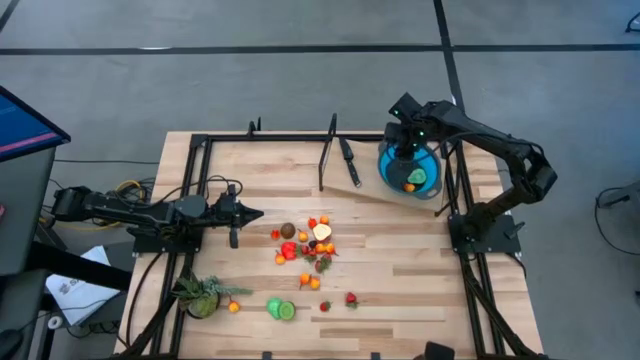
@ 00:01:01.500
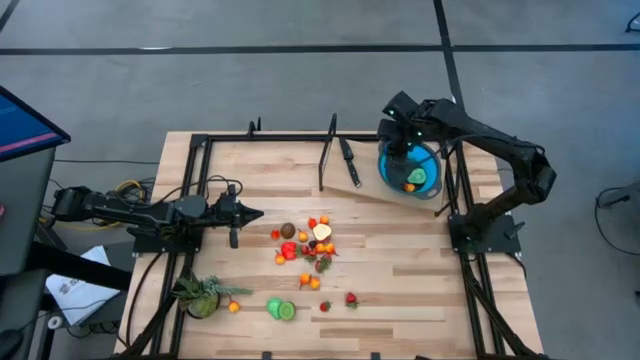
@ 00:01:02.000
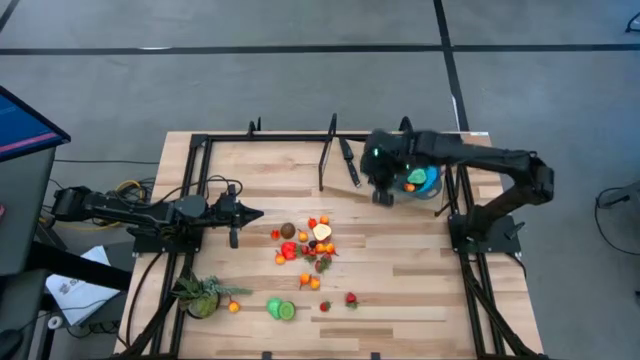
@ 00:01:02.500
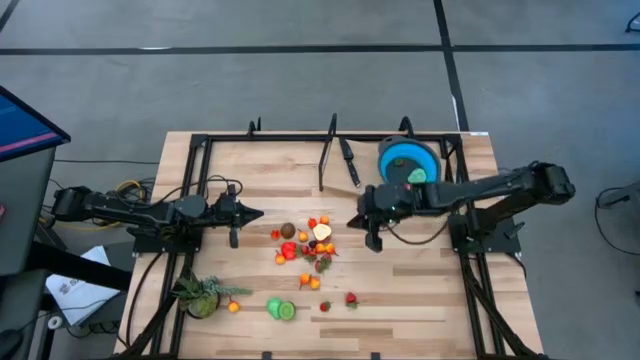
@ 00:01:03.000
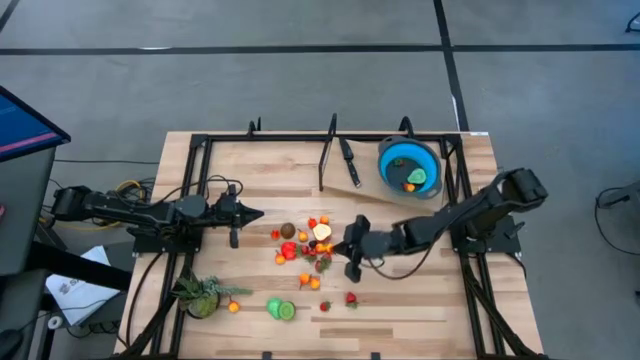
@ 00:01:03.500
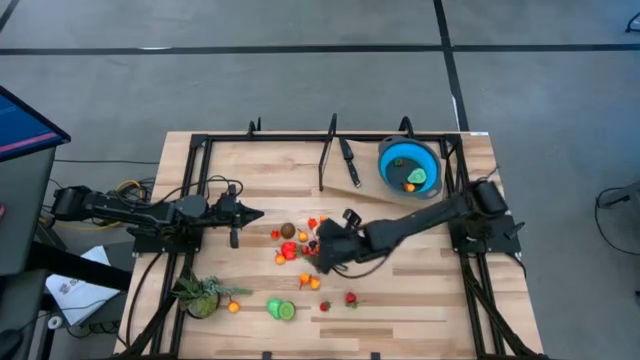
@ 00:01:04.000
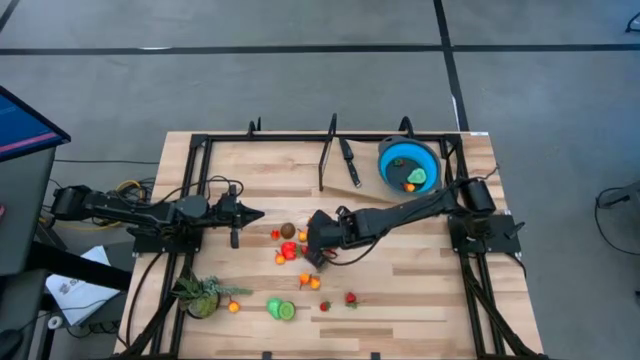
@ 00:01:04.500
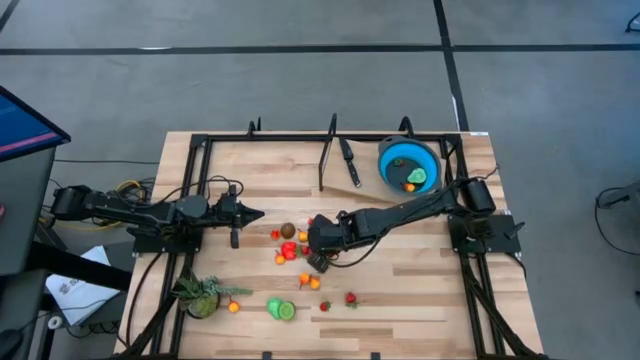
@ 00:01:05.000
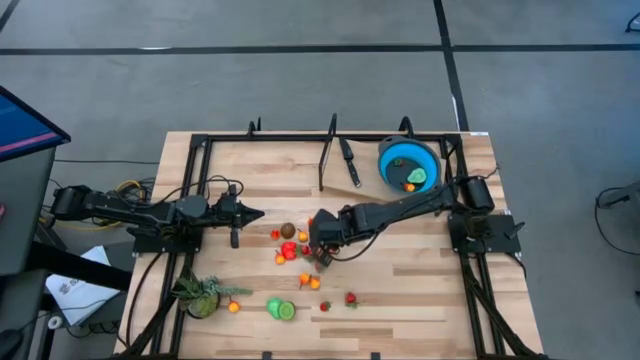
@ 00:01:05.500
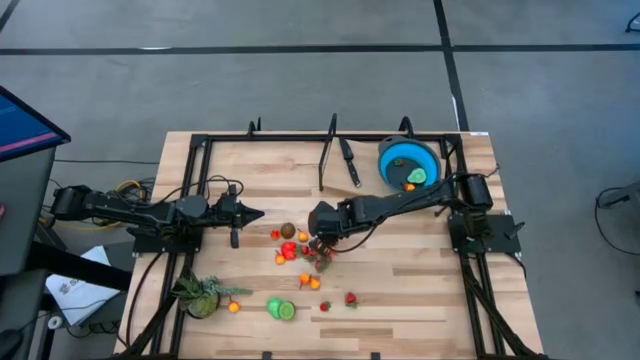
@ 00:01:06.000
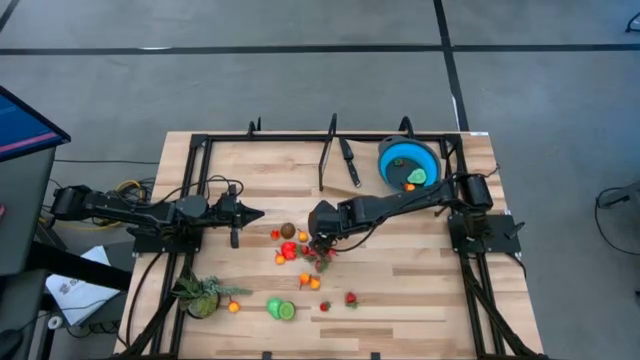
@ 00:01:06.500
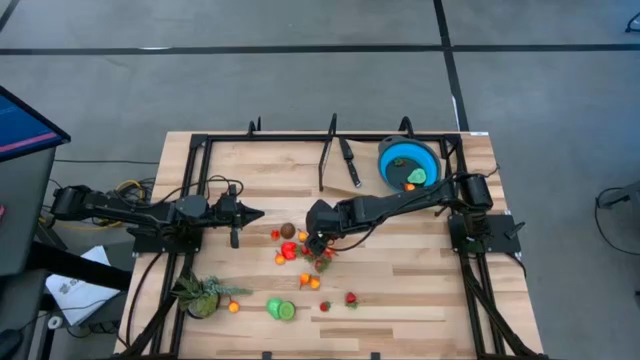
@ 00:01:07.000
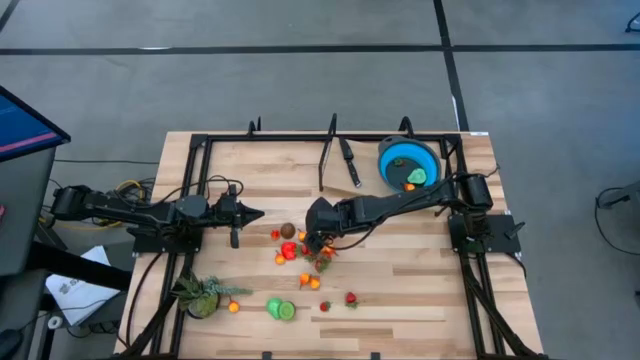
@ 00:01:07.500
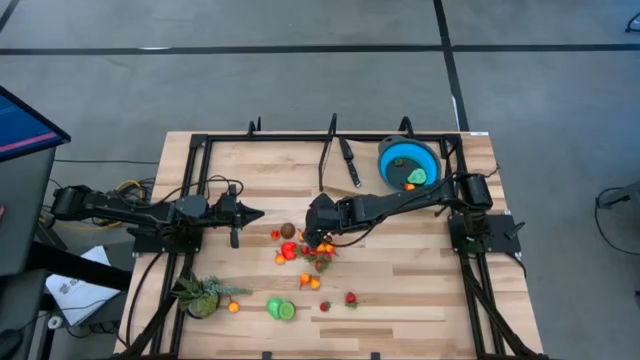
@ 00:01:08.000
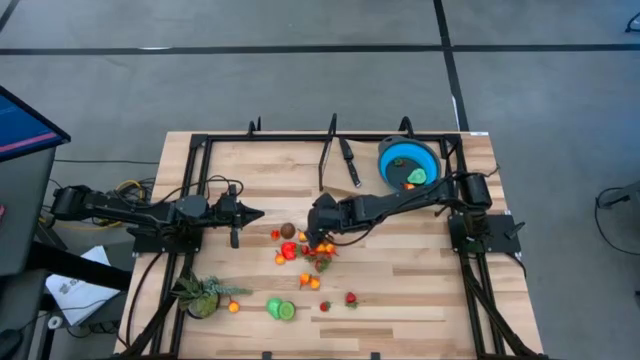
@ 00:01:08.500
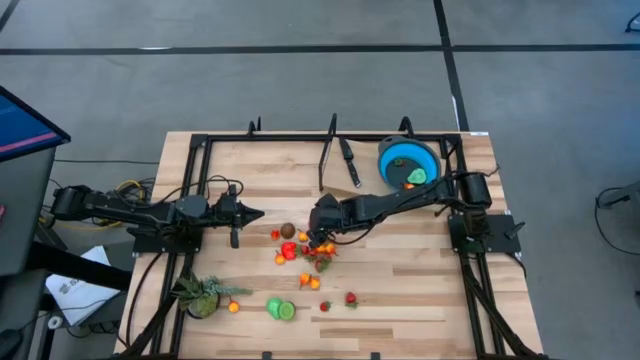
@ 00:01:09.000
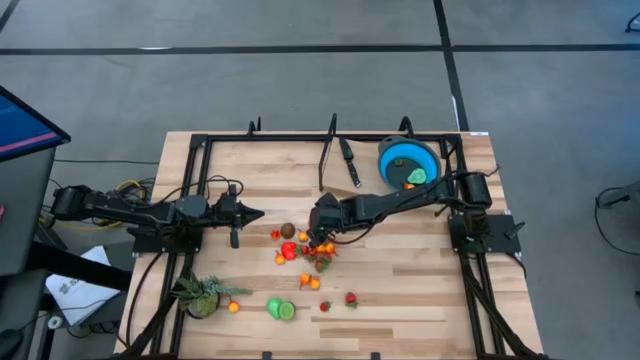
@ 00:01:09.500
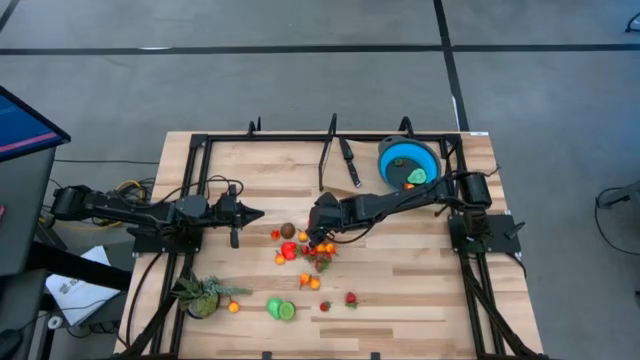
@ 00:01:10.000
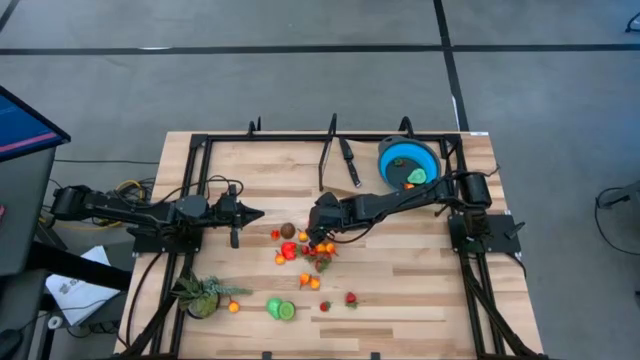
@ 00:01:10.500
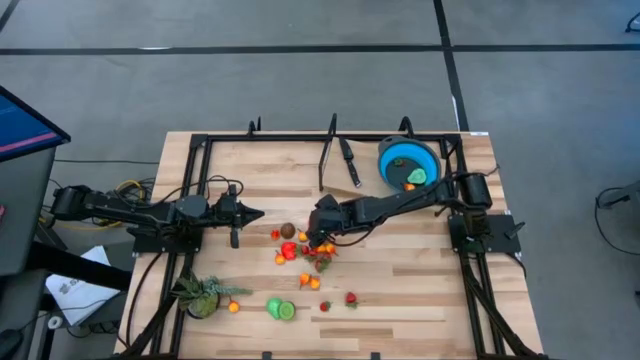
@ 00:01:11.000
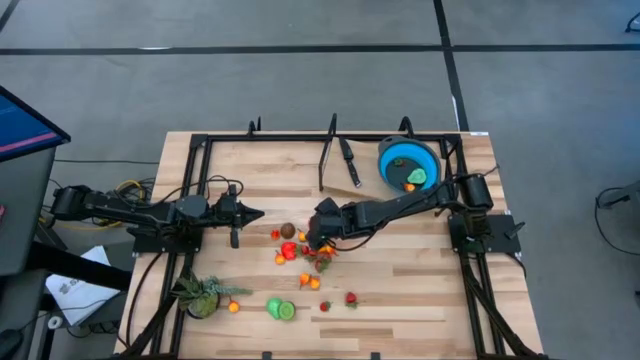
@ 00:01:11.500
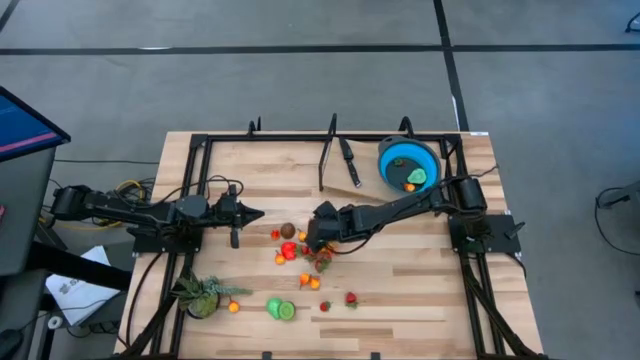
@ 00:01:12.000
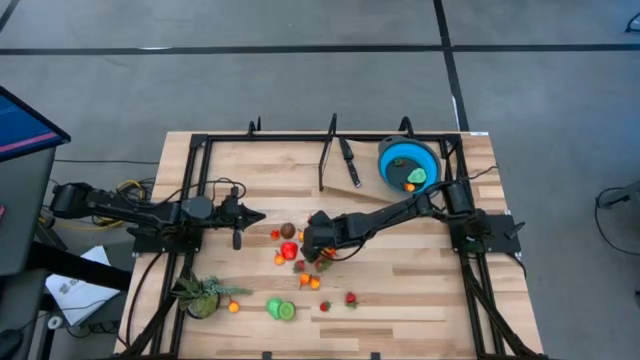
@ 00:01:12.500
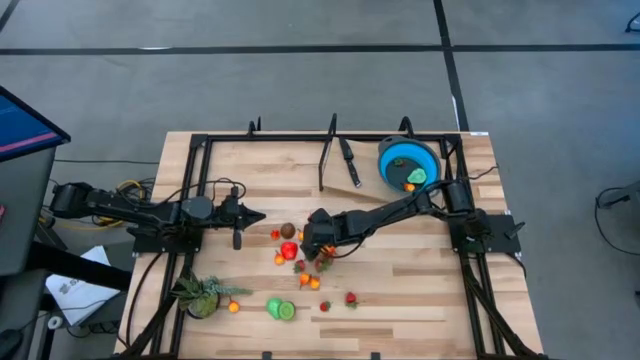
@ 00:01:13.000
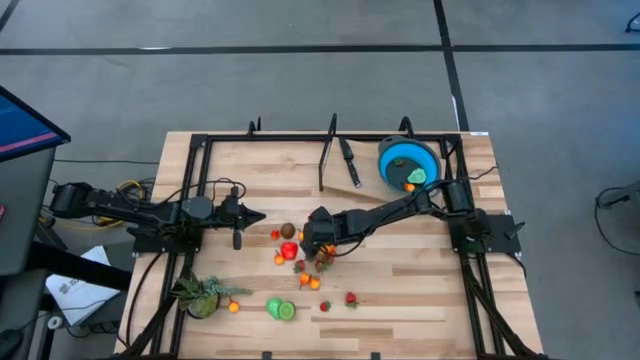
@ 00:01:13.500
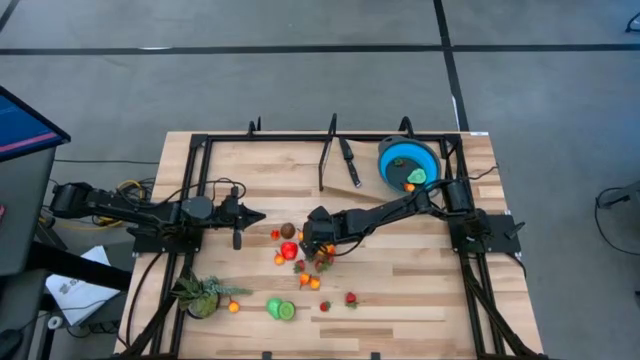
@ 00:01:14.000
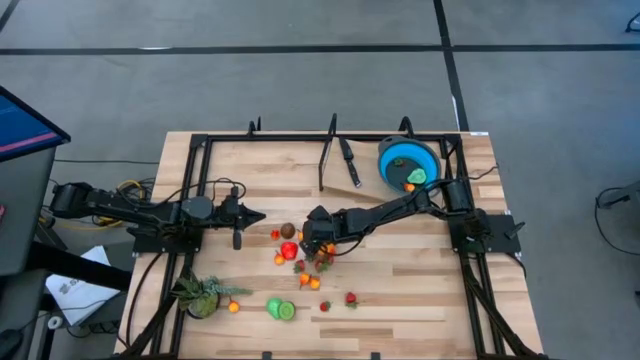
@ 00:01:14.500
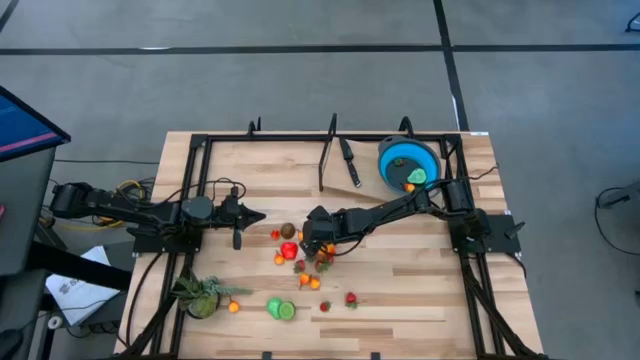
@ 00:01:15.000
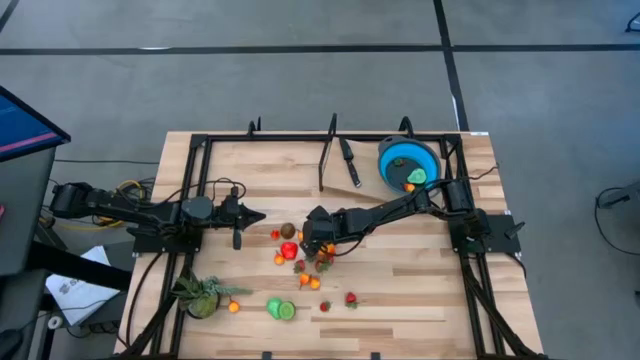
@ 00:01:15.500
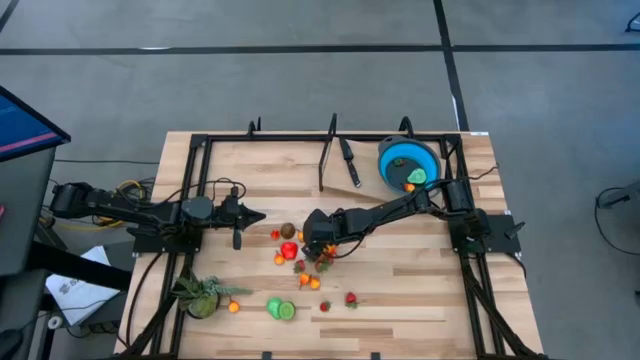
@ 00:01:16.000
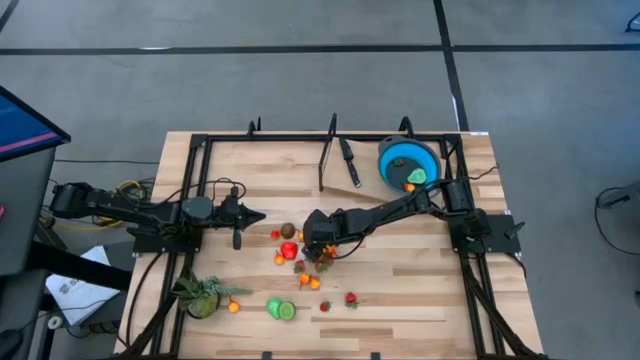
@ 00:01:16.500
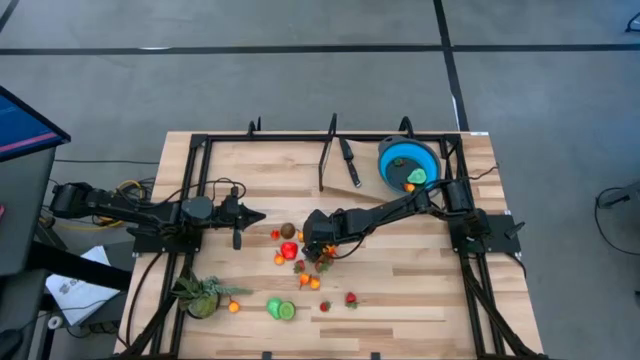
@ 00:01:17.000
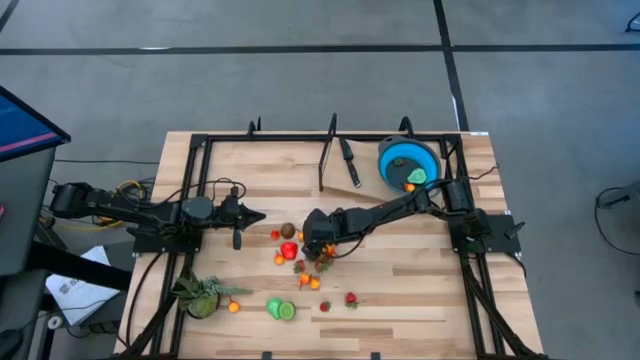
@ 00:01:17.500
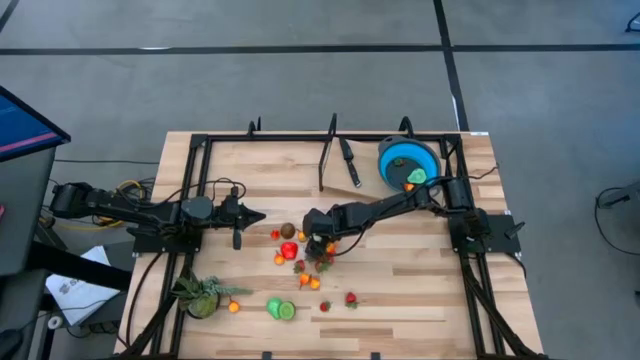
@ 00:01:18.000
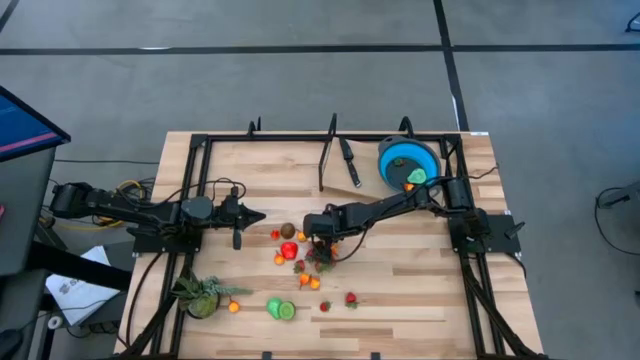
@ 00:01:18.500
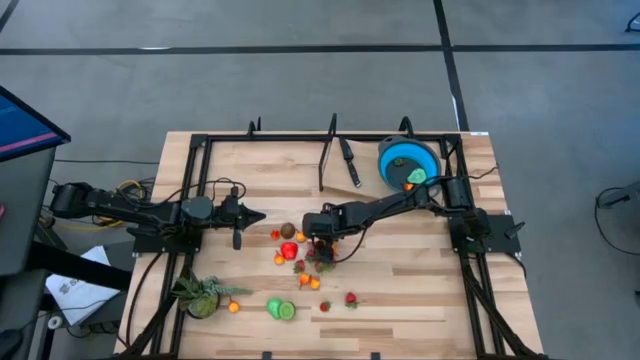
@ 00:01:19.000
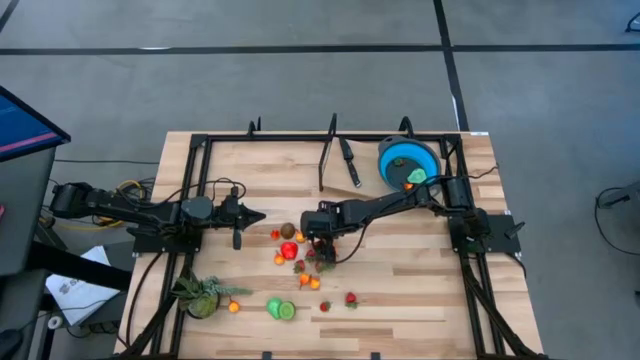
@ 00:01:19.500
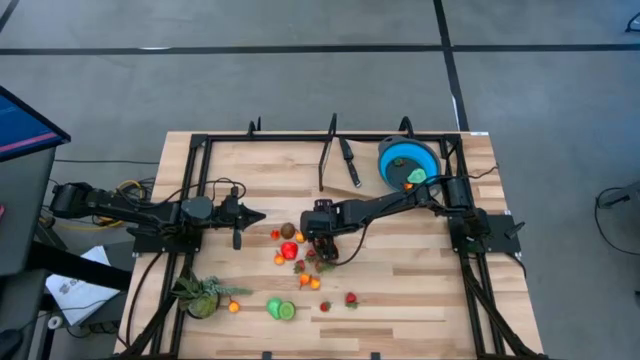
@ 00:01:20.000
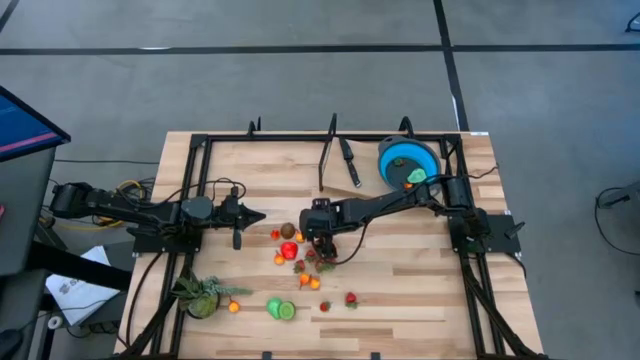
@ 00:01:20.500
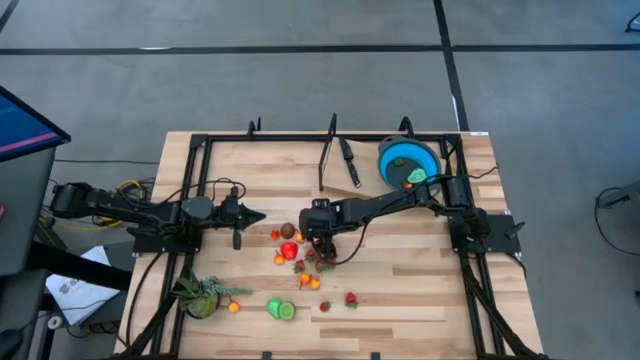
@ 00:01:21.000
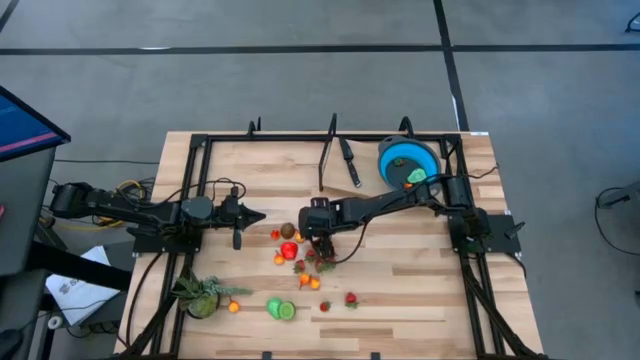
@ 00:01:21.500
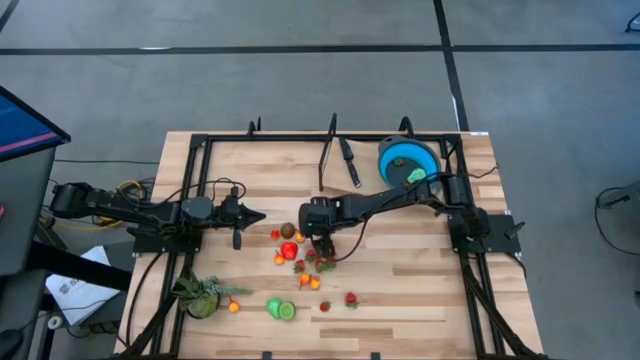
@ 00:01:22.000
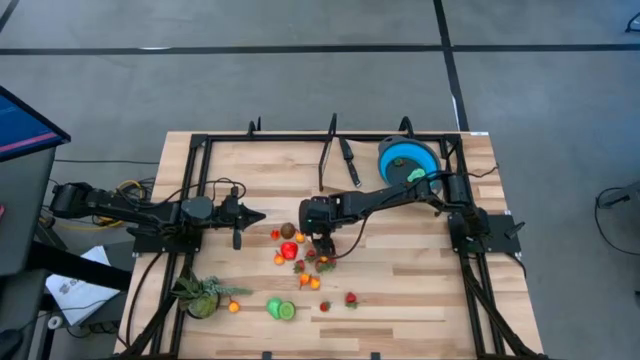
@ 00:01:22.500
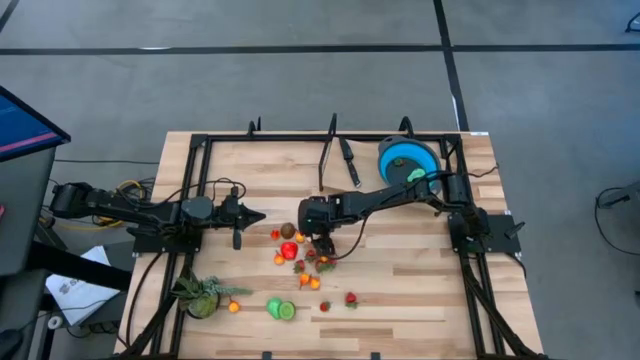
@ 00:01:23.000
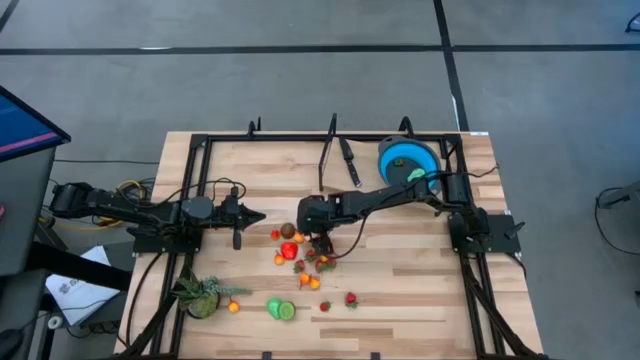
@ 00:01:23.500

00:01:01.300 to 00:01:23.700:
Task: Pick & Place Fruit
Put the half red apple into the blue colander
